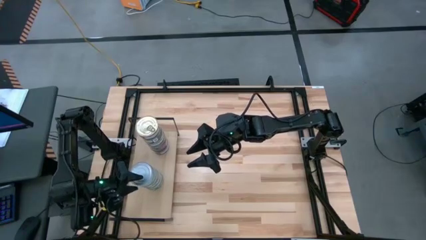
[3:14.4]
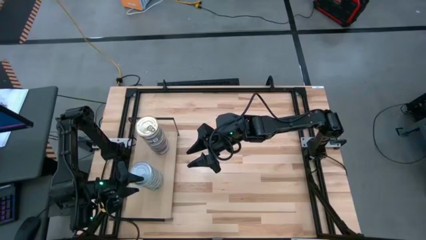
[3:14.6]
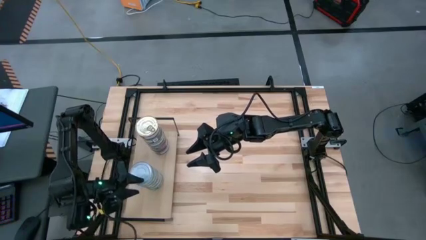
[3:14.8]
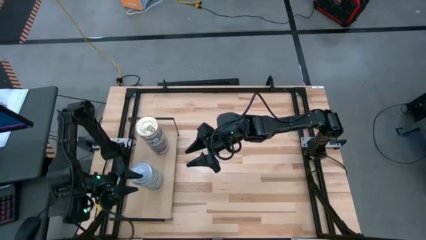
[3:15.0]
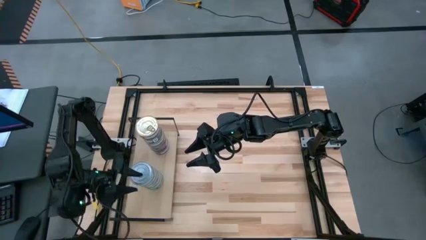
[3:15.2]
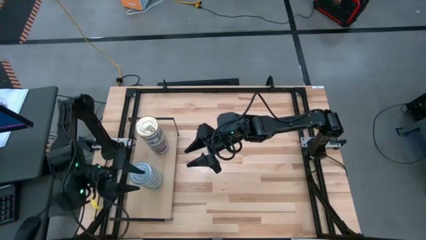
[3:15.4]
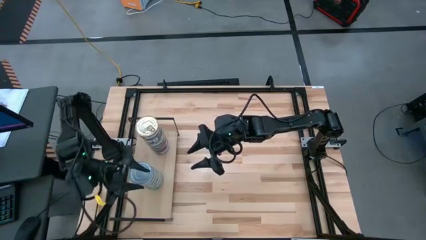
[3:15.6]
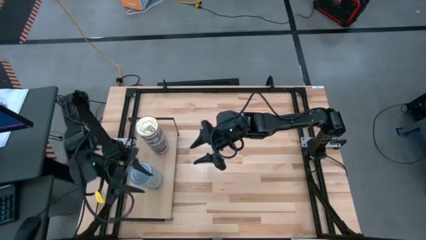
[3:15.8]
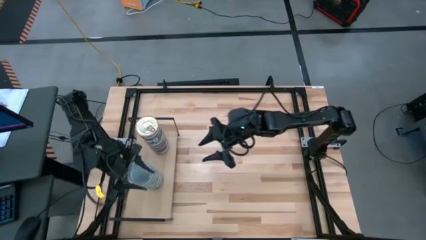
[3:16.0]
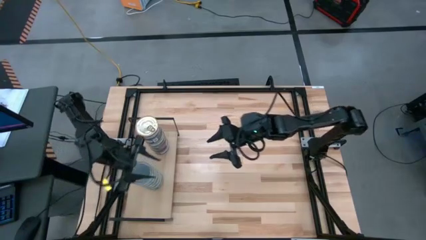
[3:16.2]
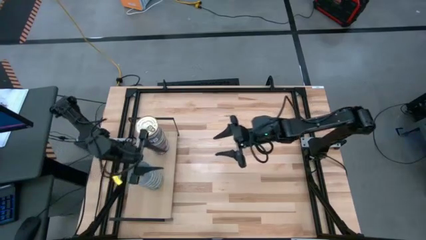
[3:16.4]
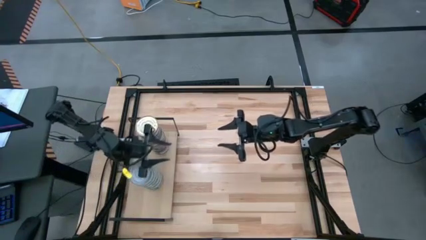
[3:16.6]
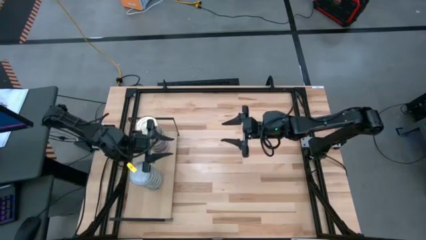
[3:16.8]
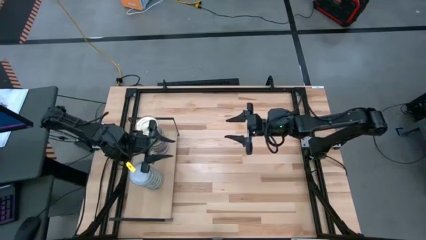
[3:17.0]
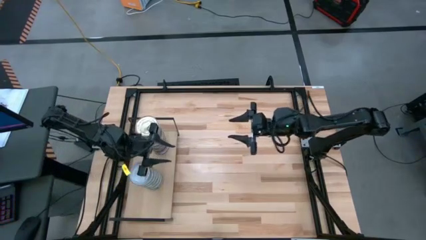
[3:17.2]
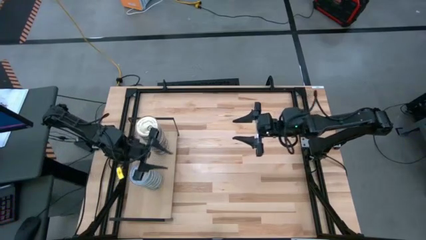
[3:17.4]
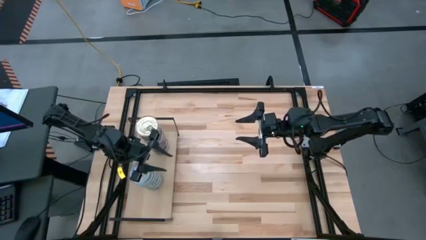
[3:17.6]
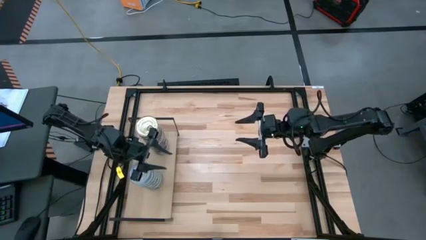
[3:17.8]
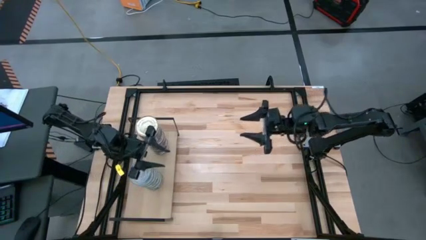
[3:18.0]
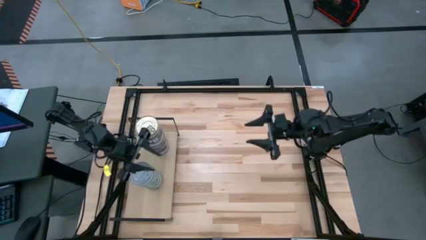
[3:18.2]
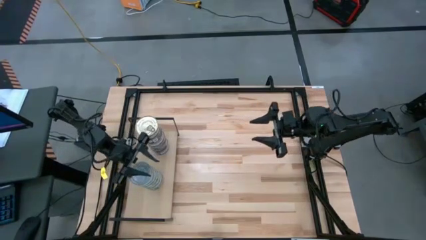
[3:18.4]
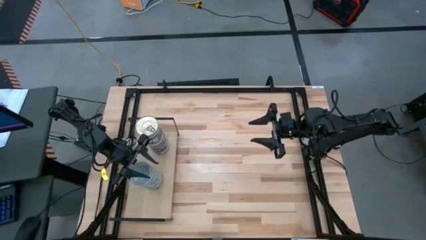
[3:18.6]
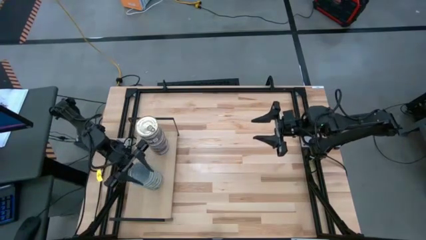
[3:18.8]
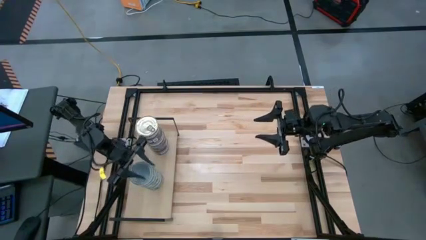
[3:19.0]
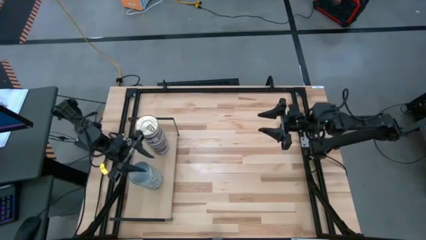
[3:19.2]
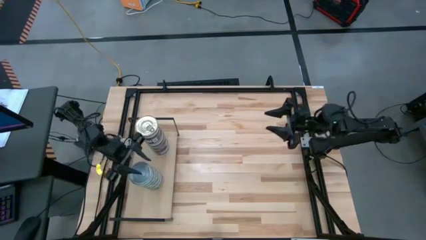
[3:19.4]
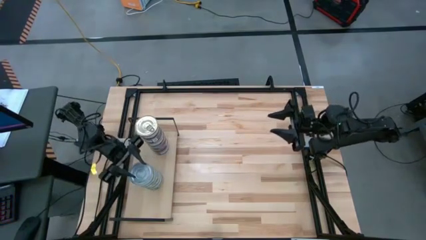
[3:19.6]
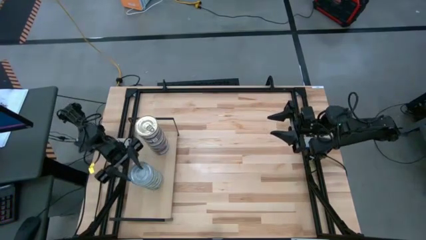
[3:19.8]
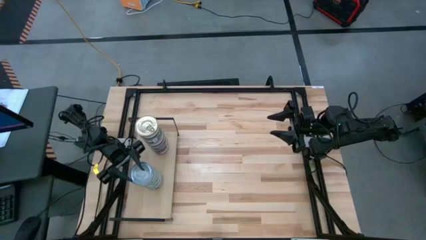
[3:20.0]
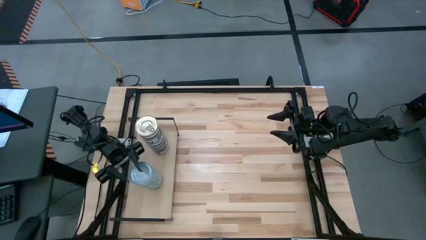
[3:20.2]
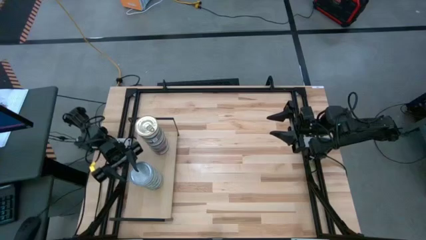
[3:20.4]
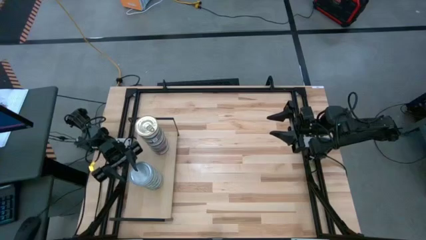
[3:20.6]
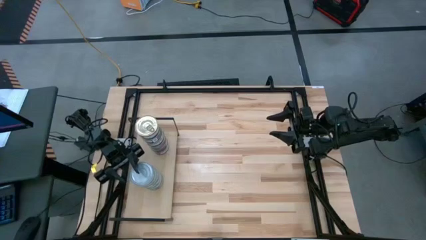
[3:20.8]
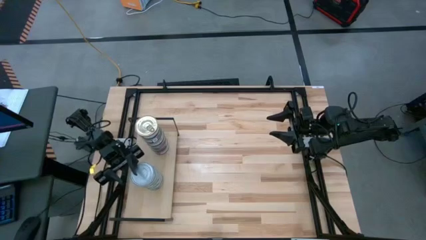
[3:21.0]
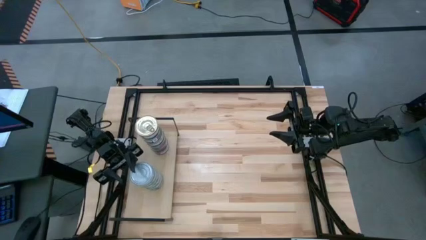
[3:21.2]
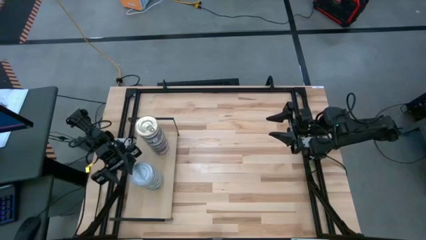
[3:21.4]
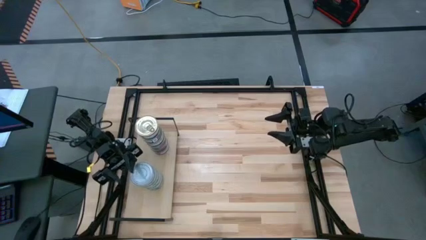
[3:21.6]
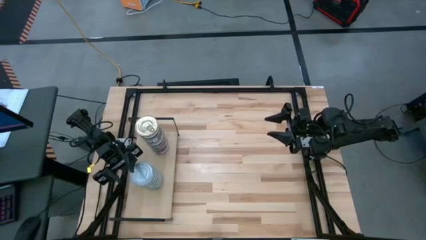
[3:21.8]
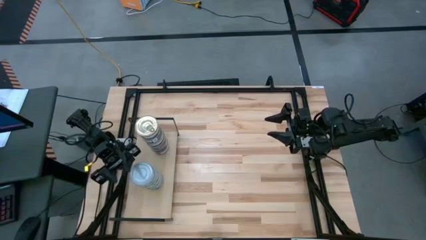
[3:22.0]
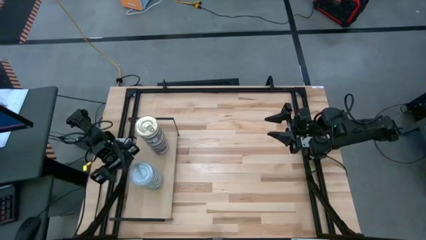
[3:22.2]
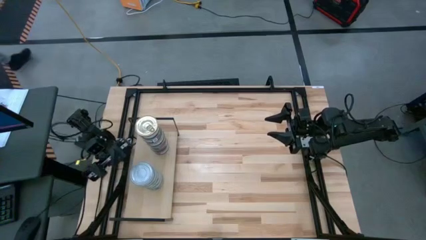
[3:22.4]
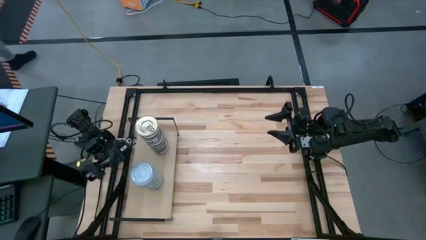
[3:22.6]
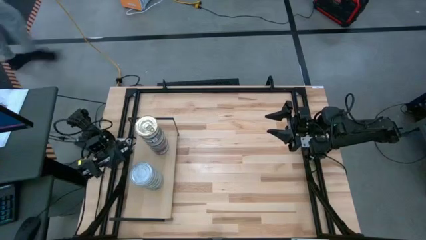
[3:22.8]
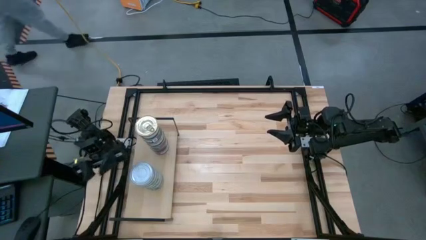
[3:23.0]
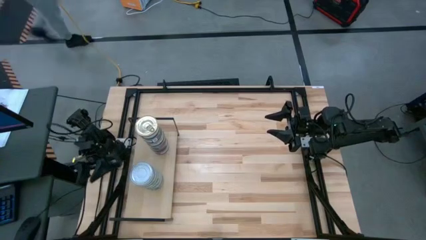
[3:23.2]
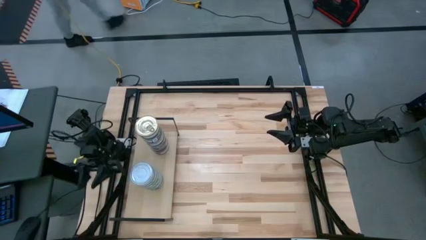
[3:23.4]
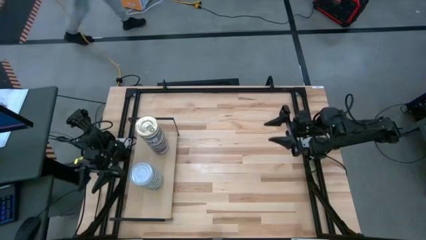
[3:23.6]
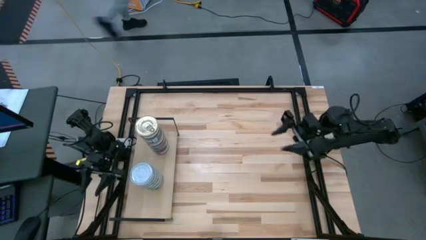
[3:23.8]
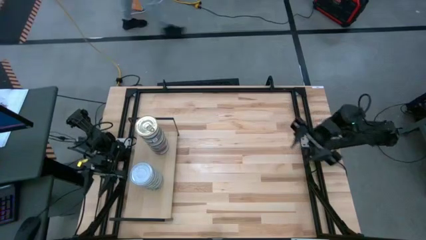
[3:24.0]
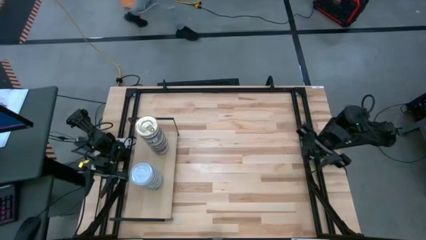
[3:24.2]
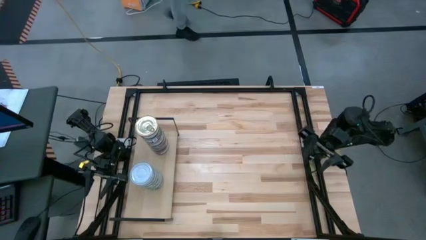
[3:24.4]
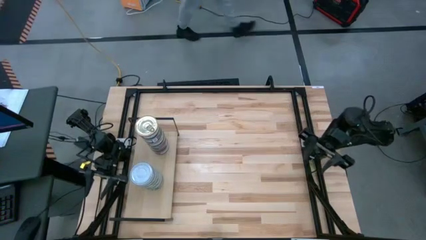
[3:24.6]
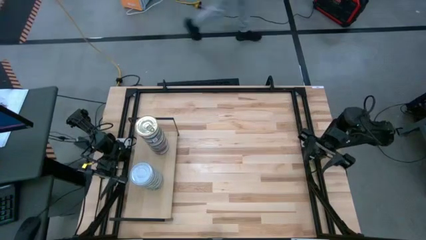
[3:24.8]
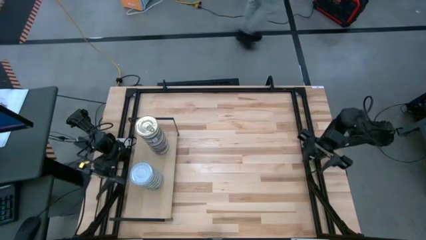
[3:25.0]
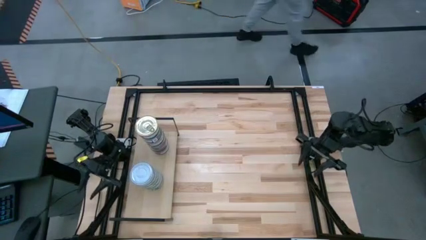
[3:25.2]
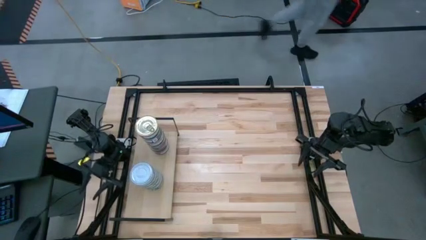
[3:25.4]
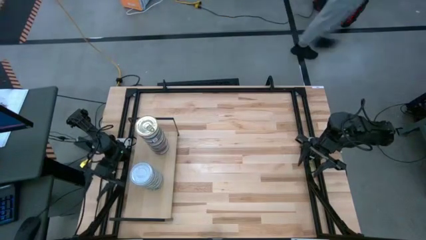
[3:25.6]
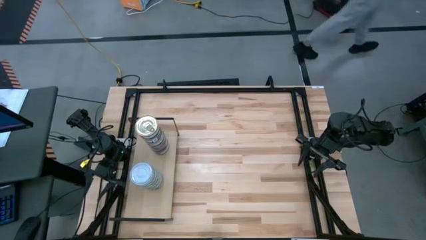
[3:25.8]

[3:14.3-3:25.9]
Task: Stack canned seafood by type on shelf
Return to home position
